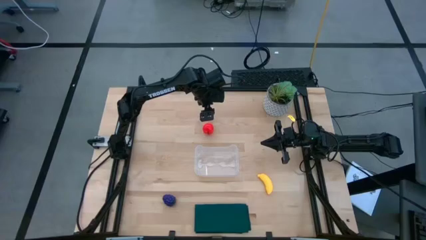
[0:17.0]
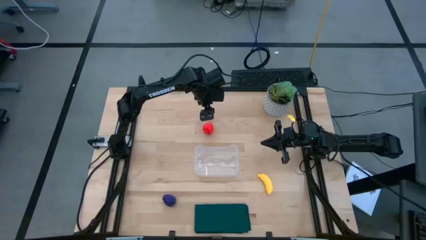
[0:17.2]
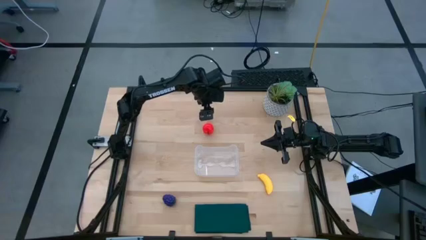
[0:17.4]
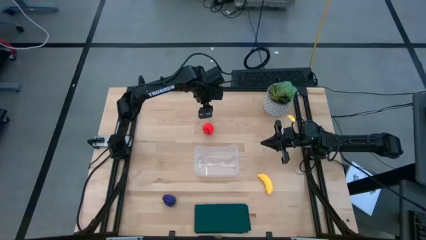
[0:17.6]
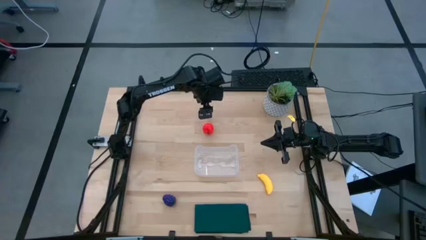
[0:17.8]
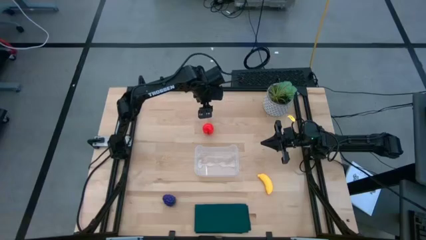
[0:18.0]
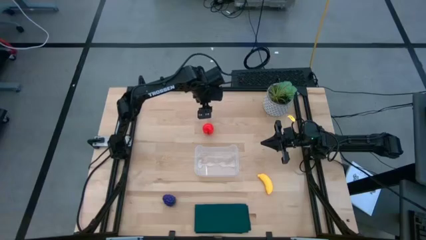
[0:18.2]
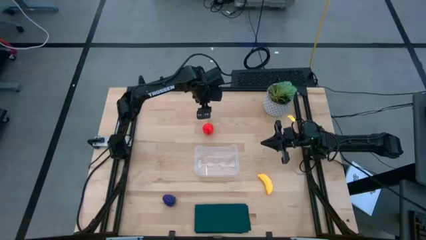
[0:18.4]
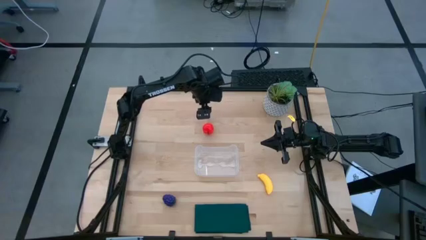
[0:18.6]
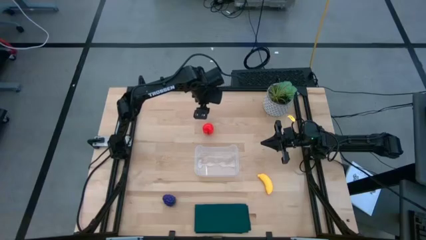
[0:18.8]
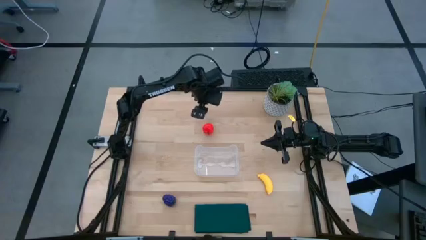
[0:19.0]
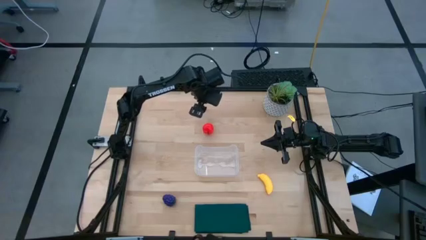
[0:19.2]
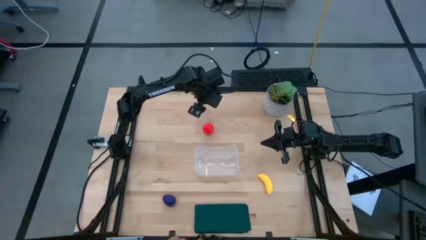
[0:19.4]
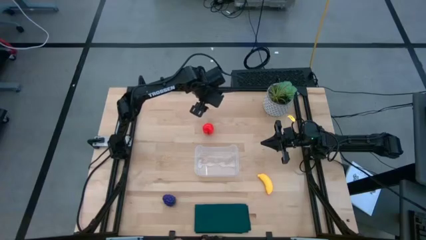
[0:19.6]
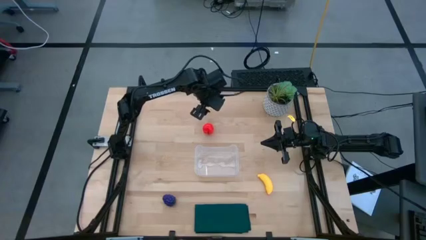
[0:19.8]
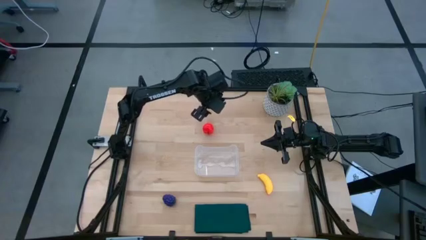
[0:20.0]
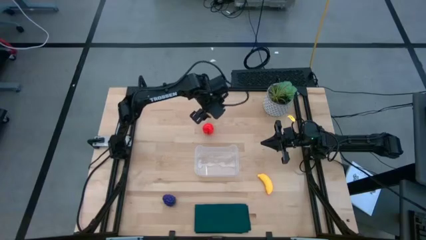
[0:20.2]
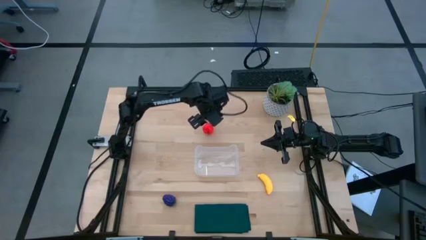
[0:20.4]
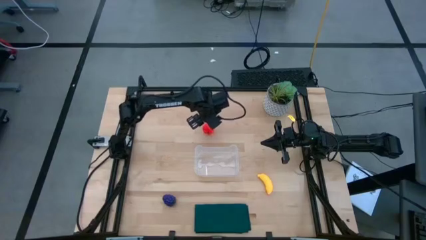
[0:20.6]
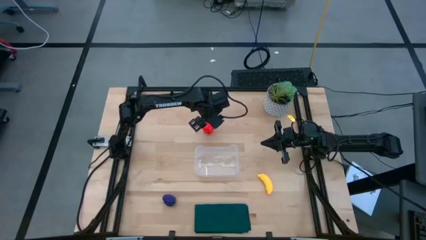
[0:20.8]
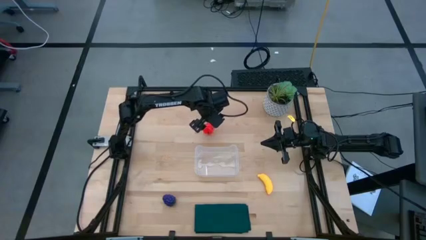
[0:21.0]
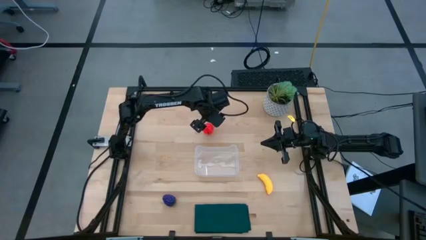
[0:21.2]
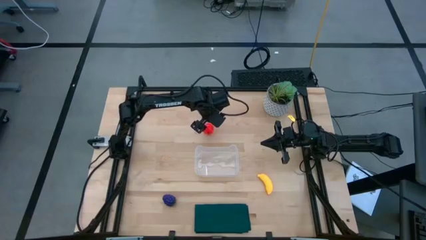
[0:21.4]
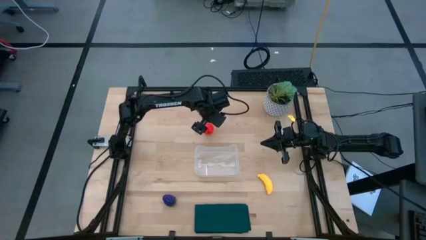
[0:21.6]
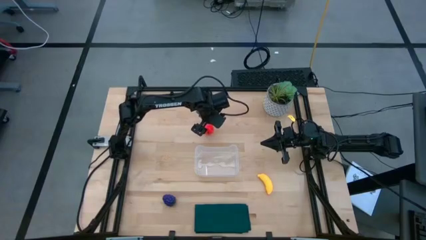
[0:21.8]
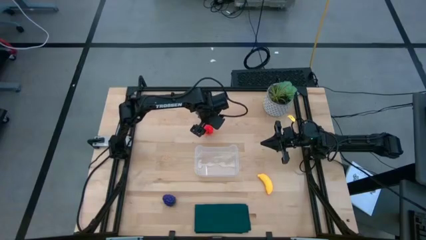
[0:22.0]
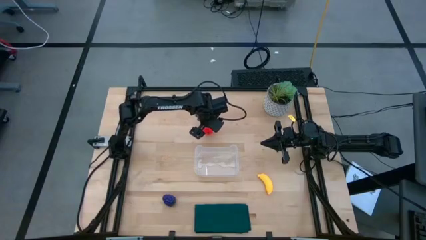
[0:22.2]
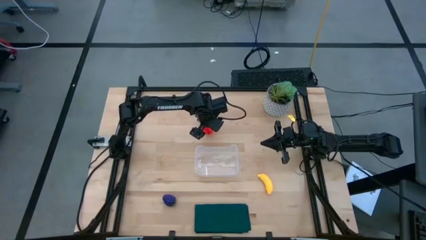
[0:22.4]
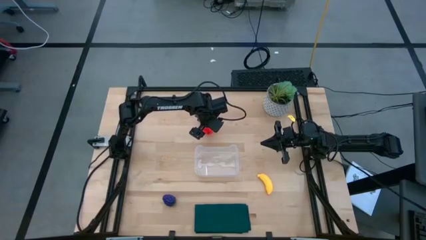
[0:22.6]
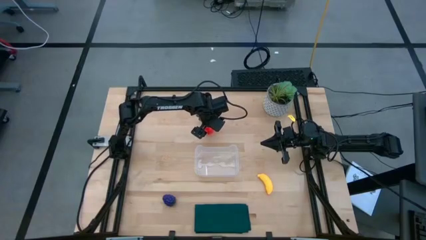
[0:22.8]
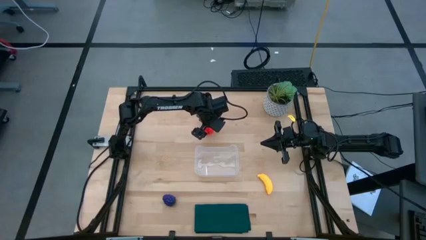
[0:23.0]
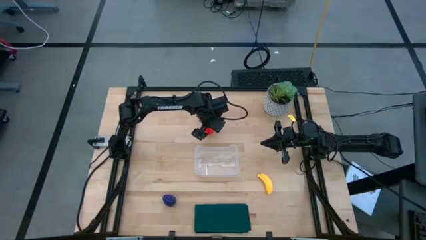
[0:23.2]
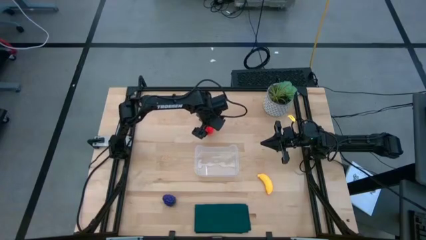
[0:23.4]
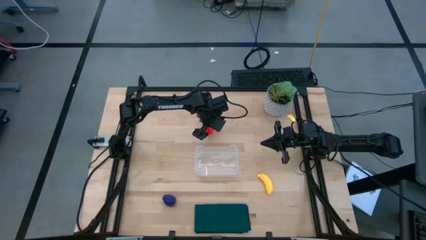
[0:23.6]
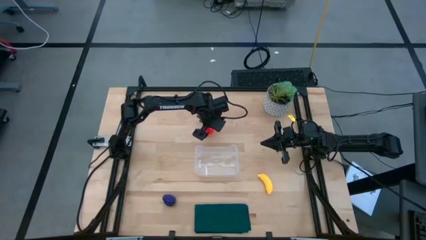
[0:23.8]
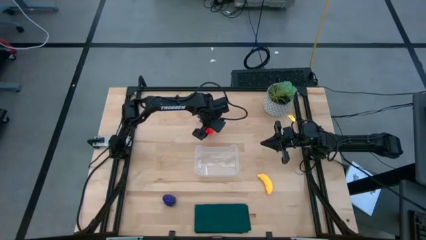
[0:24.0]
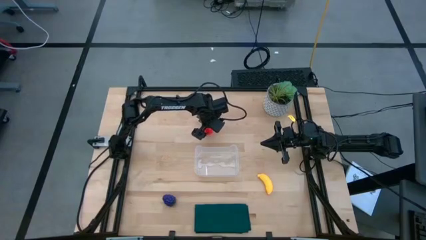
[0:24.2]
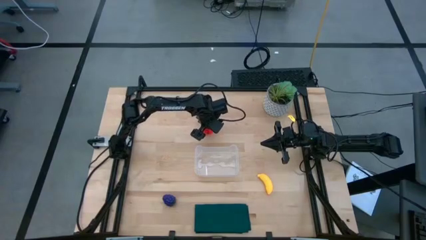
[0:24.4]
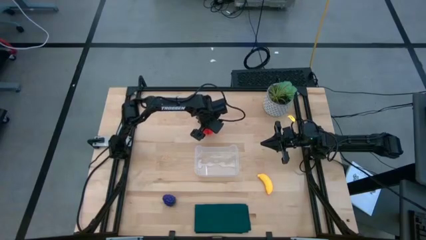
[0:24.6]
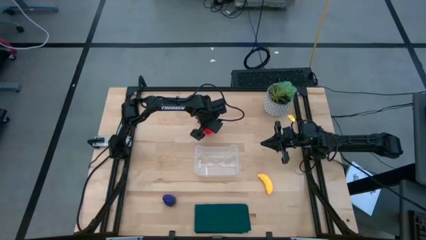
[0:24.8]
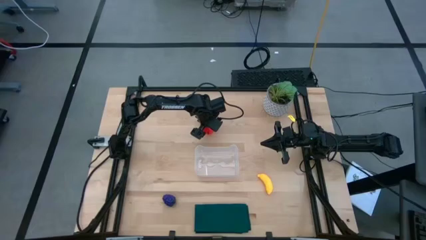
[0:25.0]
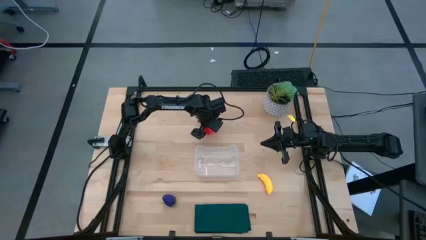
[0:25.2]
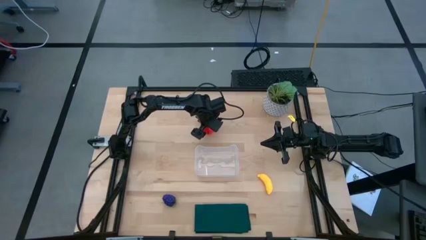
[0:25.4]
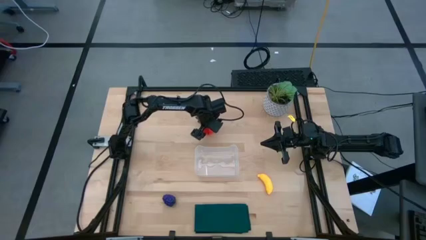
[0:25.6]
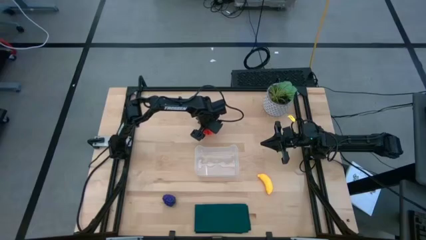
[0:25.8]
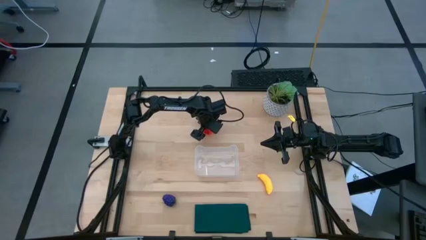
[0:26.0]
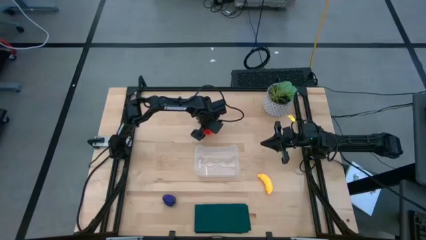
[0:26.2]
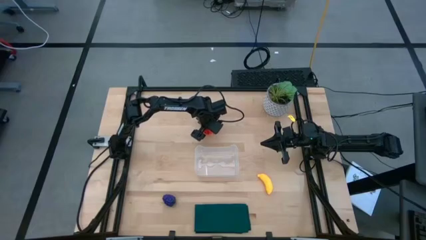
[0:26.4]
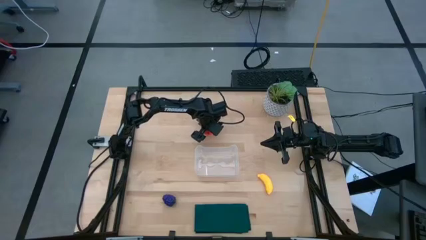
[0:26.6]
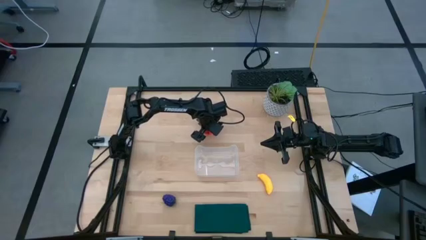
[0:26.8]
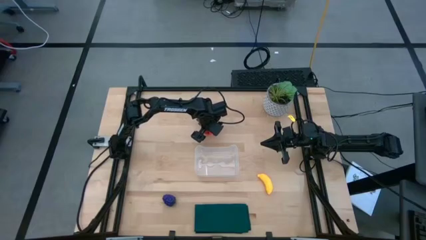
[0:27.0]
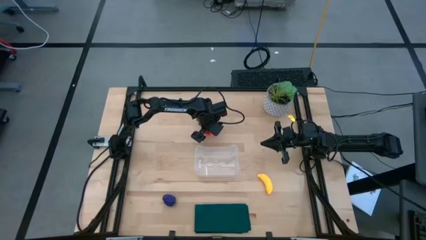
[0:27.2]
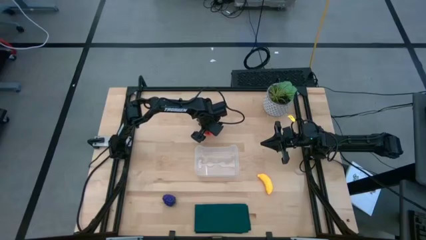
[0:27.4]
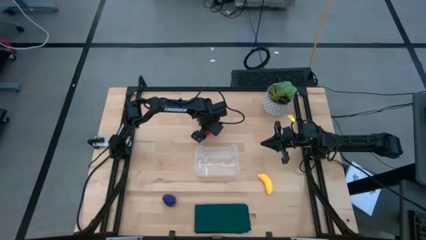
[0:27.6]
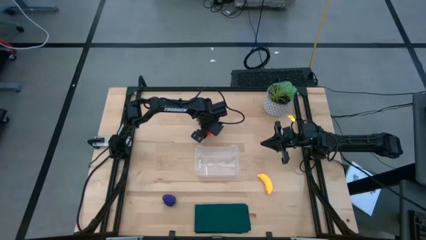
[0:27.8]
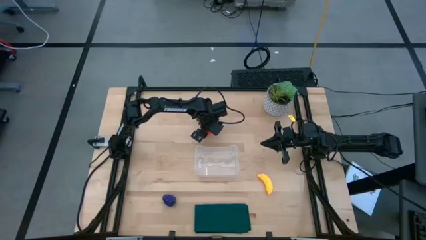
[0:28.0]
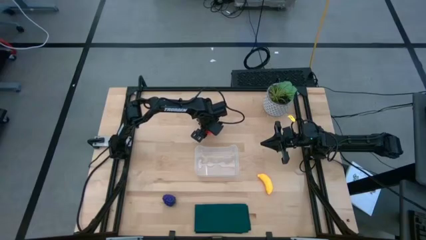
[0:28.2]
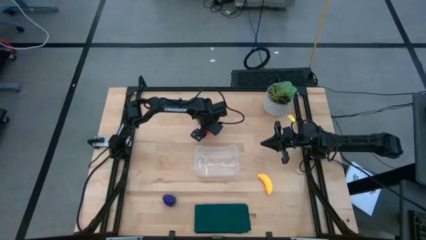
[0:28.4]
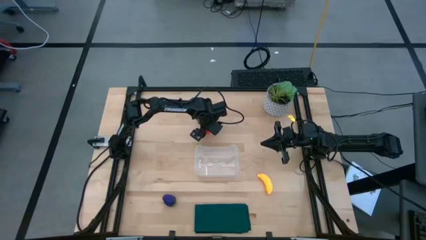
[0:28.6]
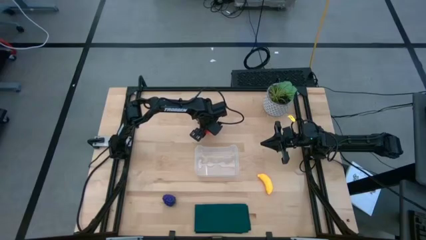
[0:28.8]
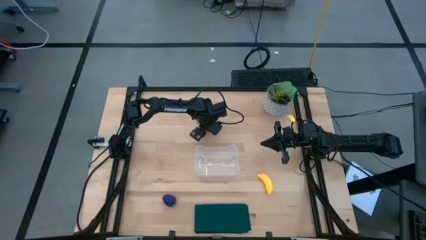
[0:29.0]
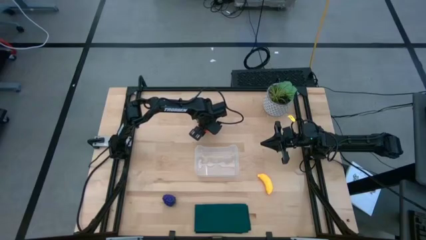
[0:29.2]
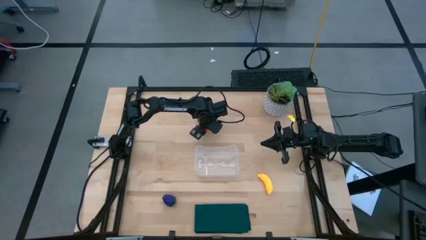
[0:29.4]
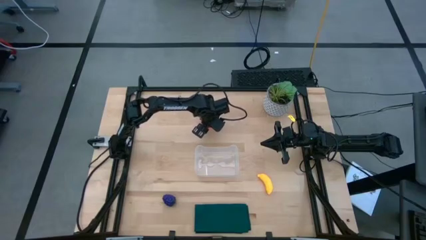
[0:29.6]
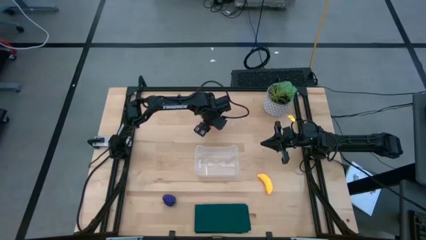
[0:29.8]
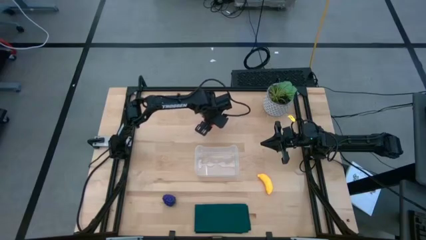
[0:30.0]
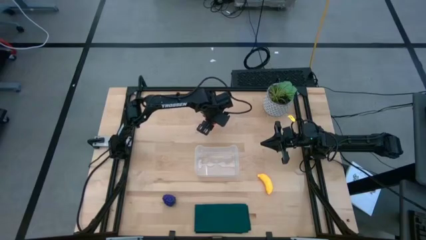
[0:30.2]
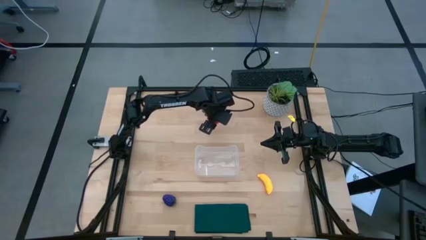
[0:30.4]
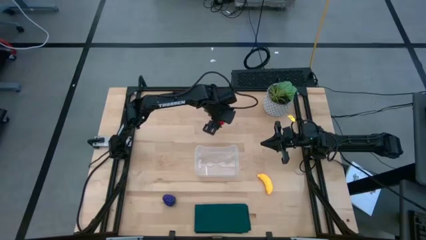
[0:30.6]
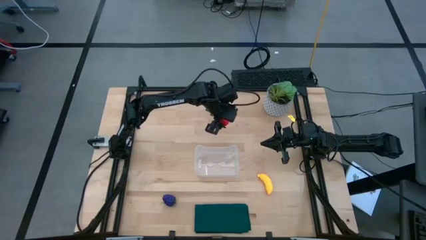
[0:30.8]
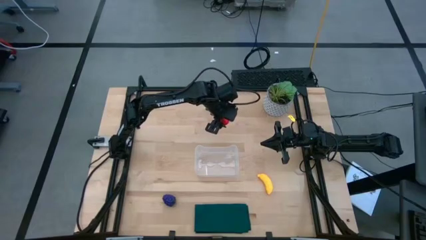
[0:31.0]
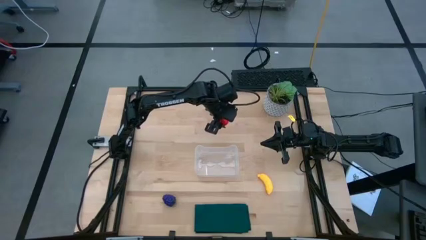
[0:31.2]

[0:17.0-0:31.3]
Task: Pick and placing Produce into tupperware
Put the red apple into the transparent bin

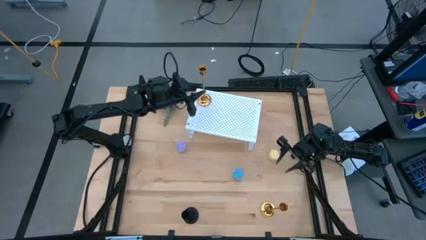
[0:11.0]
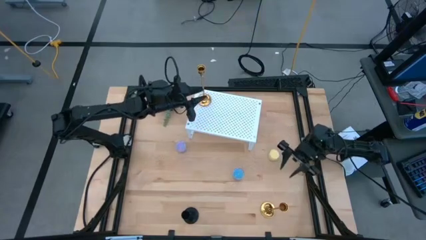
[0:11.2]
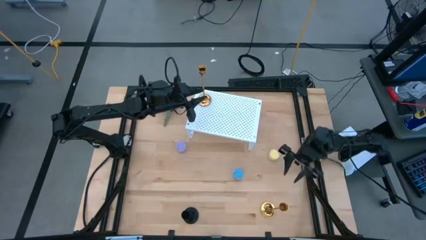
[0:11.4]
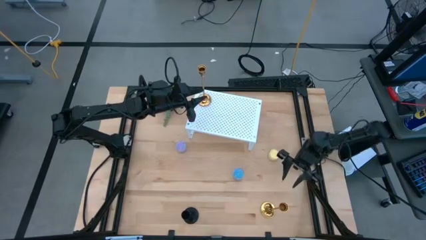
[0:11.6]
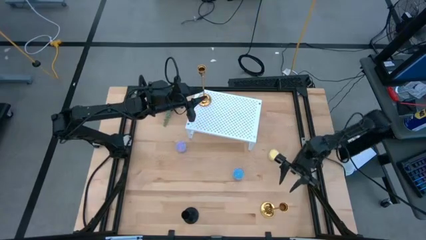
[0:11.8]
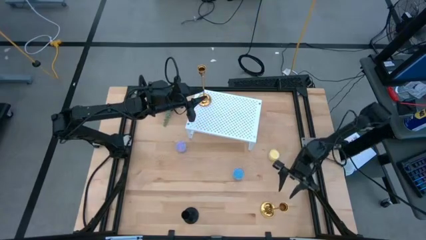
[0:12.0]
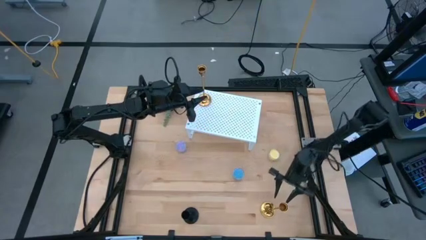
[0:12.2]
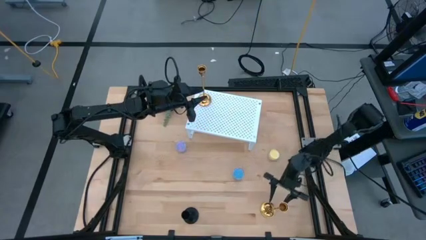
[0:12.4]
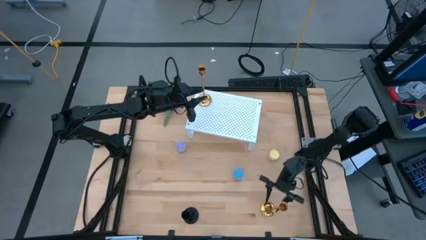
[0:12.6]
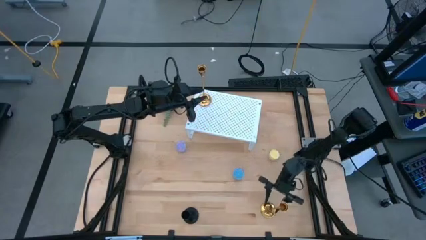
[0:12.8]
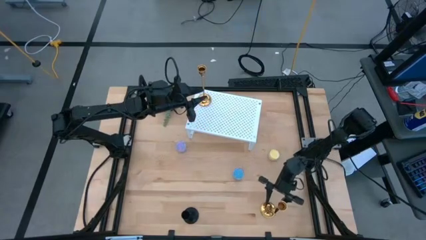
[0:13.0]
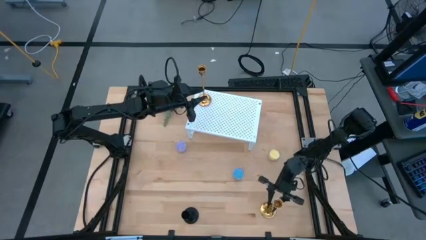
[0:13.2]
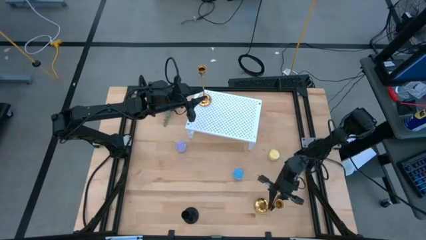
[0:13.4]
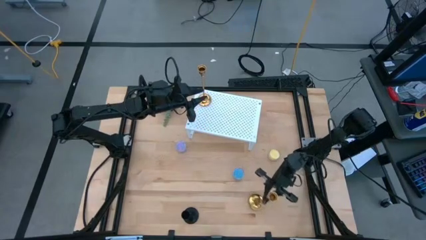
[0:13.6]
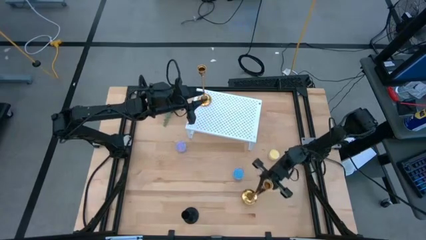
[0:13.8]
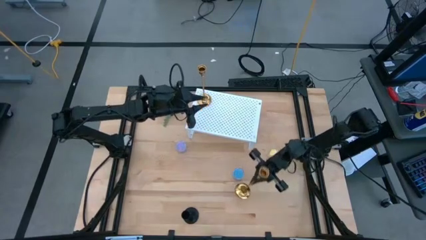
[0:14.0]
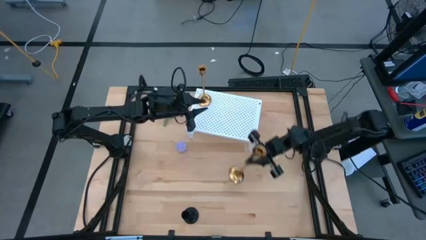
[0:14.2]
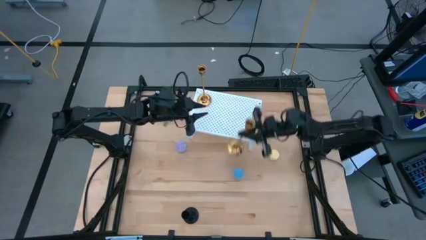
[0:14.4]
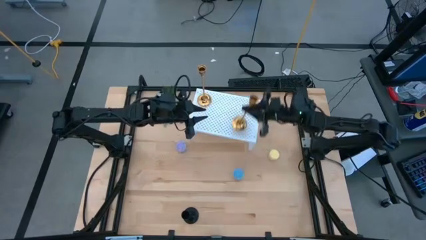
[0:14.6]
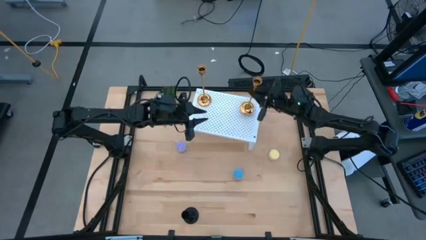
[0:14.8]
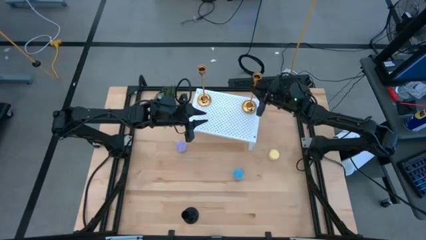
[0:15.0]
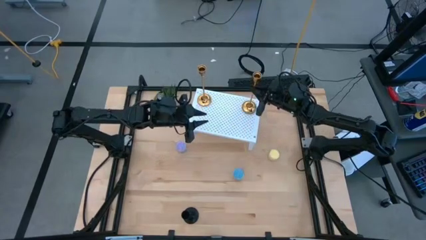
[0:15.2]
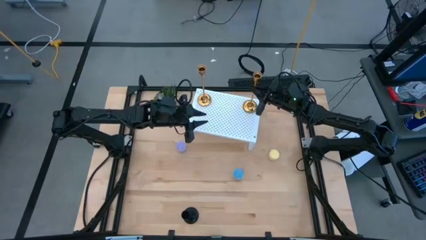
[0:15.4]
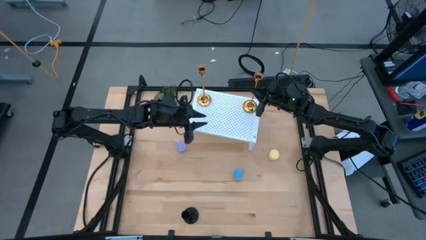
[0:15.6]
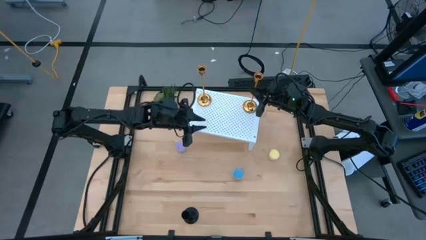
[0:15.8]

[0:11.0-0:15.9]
Task: Pick & Place candle stick holders
Put the gold candle holder on the shelf aligned with the gold candle holder
